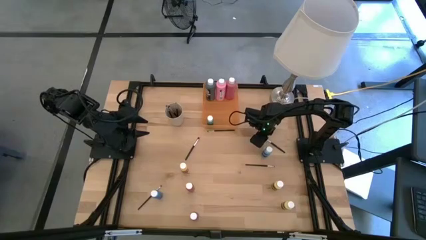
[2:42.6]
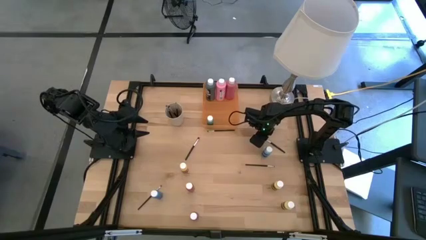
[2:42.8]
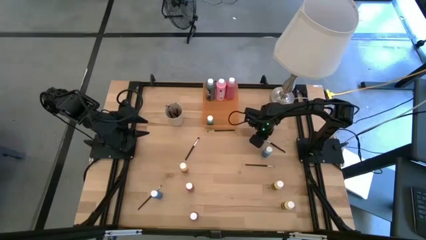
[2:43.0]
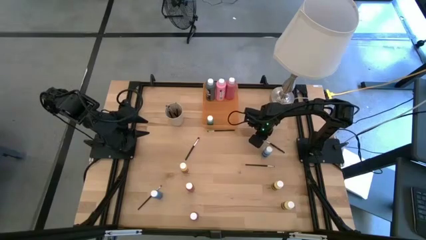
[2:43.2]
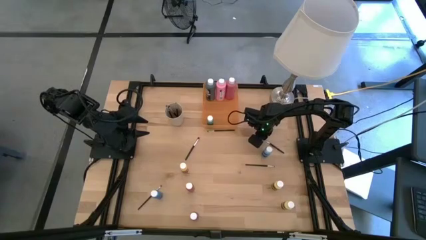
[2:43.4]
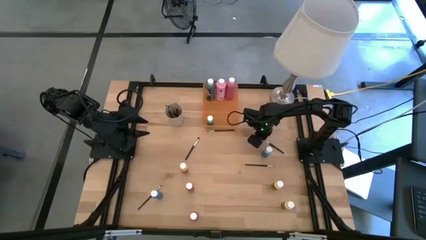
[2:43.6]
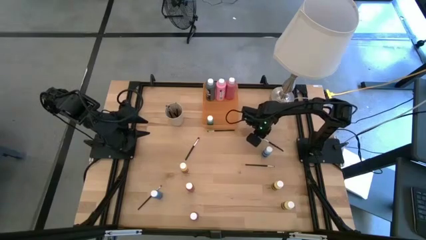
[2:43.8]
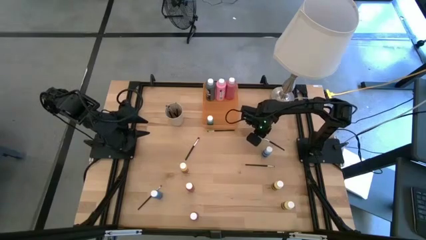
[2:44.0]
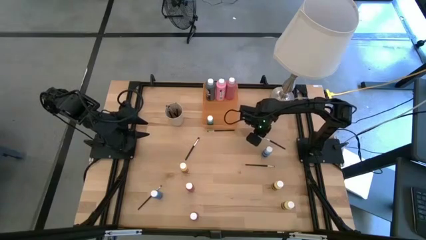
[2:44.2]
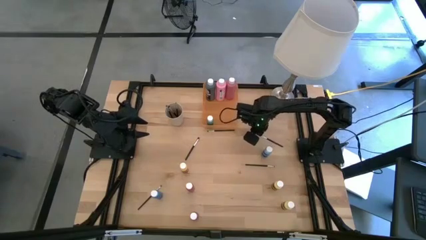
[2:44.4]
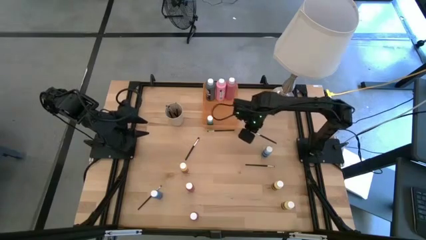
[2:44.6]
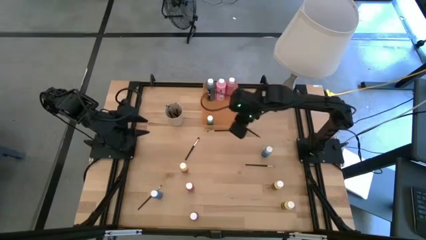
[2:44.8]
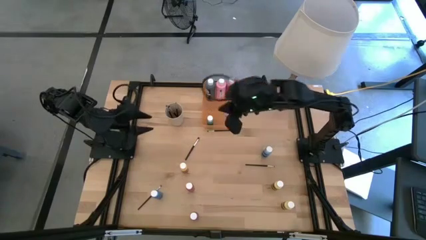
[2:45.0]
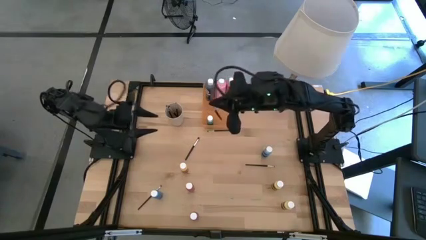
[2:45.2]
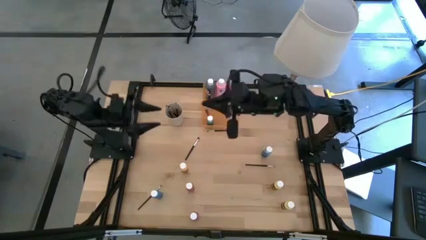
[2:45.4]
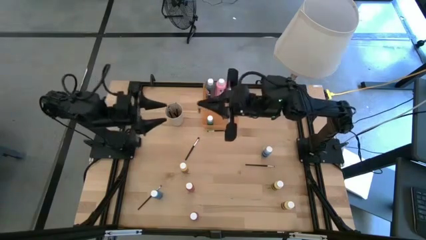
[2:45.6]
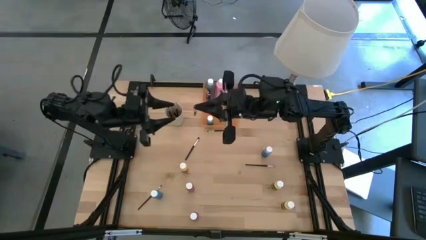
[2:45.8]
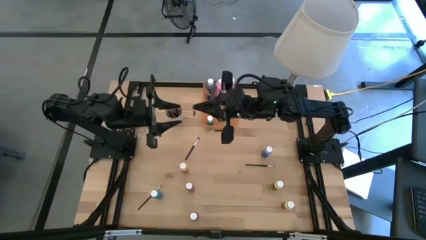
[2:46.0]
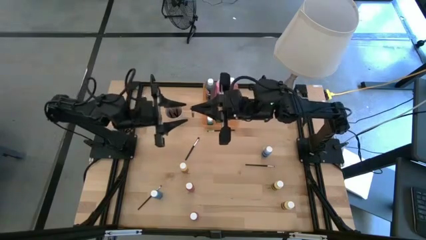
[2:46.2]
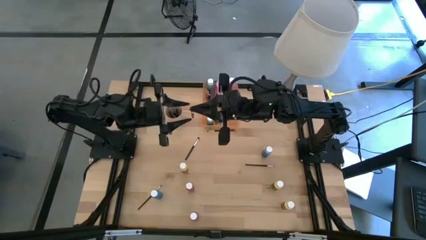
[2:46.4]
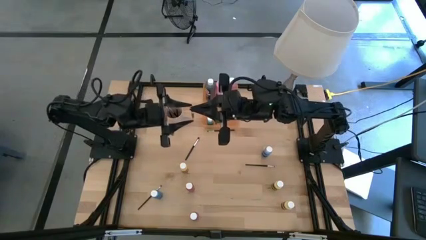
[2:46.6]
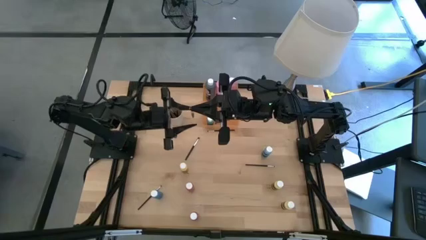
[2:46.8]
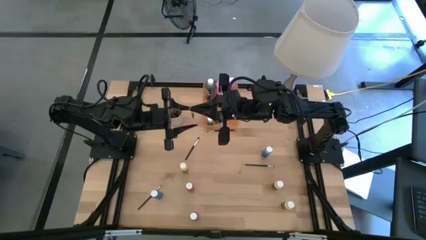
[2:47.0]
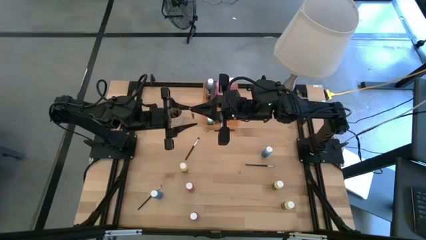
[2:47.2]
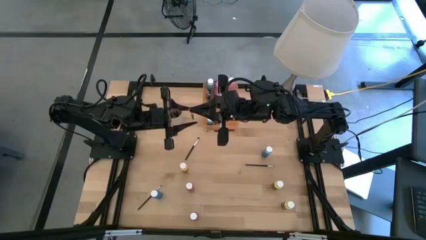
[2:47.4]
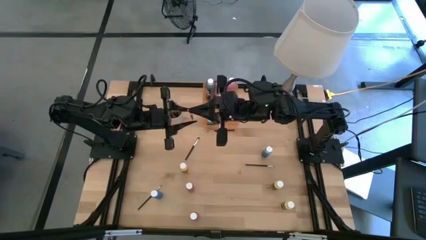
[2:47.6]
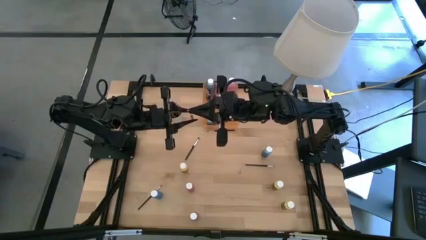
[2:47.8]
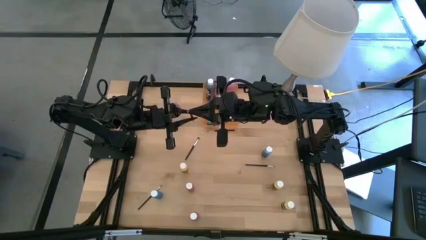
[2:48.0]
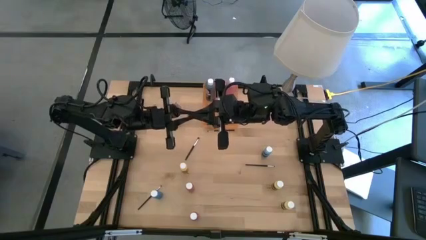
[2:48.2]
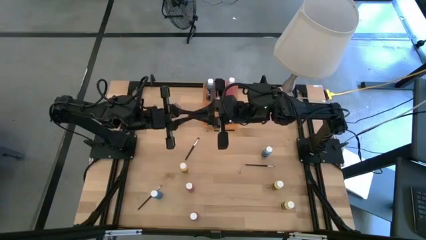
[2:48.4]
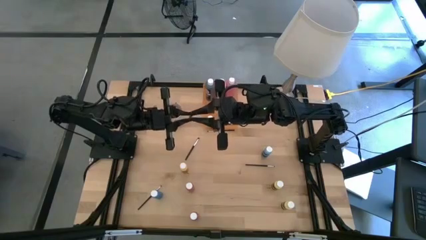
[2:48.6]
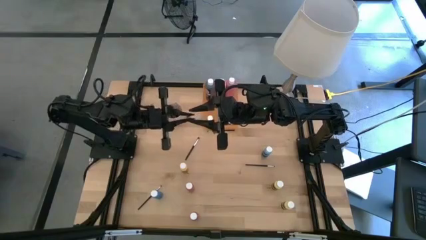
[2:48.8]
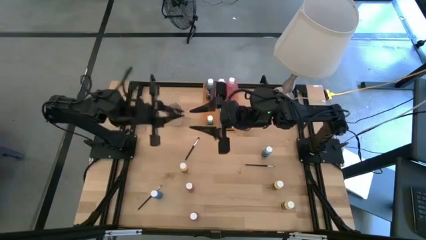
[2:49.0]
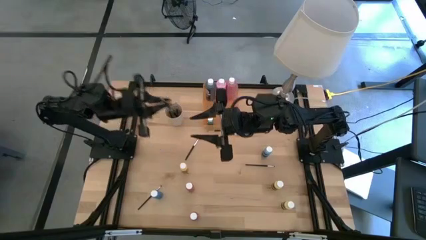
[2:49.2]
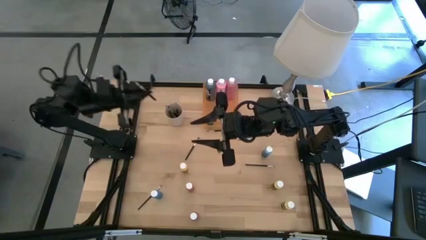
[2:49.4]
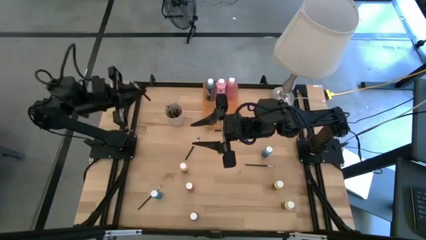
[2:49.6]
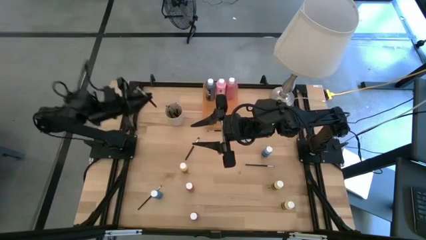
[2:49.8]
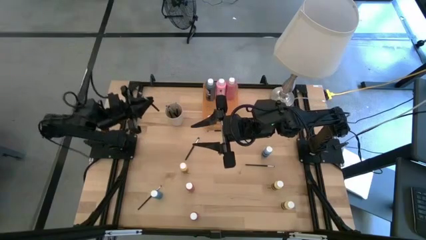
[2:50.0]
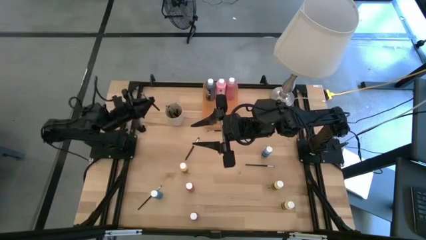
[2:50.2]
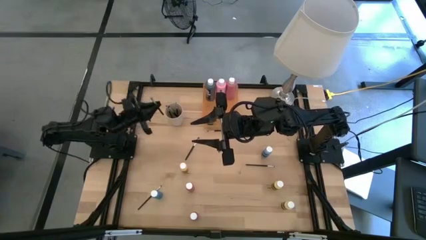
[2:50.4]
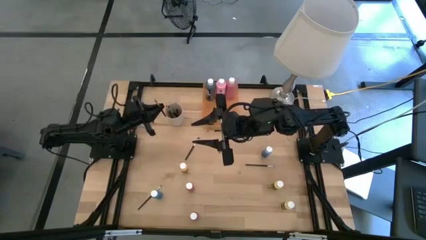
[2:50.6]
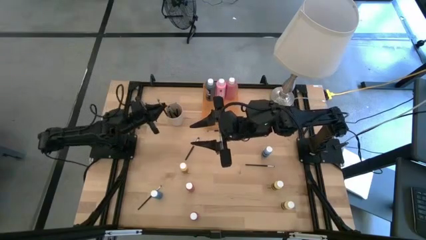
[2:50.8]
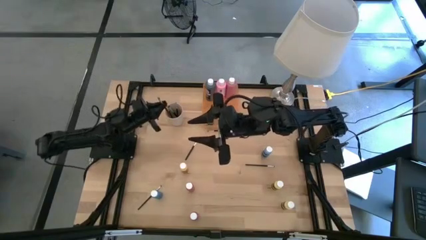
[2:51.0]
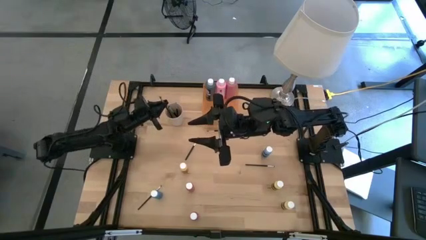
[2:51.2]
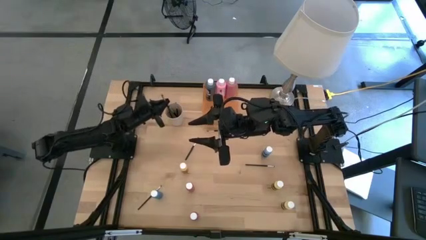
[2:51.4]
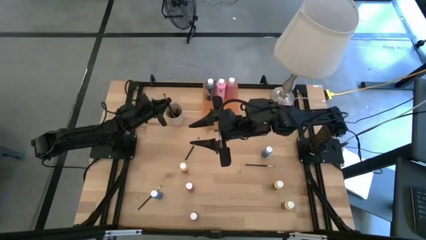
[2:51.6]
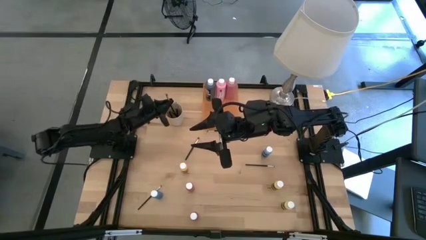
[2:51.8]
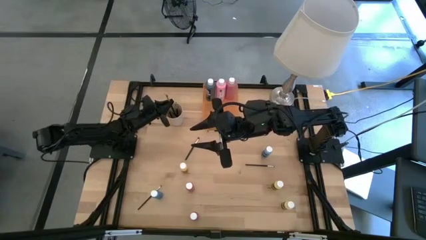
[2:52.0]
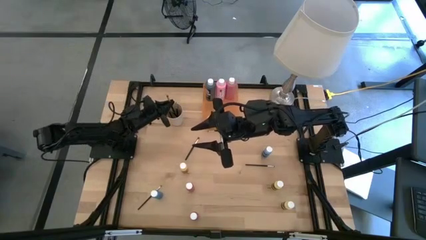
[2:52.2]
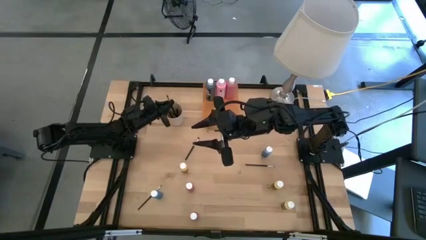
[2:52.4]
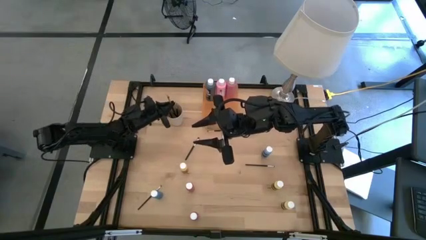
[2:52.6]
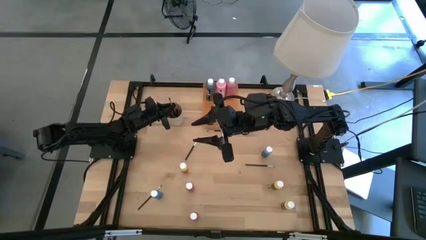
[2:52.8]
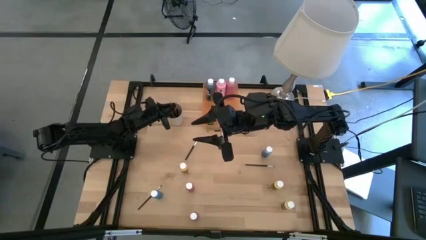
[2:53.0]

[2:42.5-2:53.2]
Task: Pick & Place Paint Supplies
Put the black paint brush into the white cup

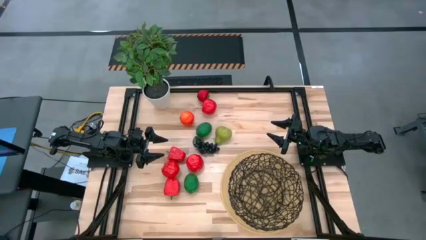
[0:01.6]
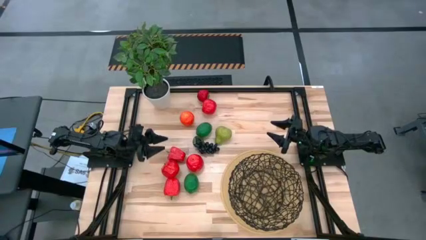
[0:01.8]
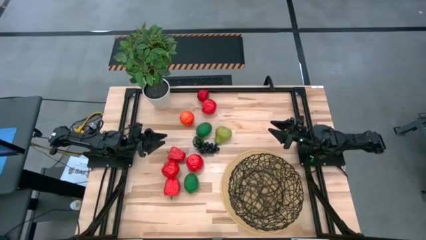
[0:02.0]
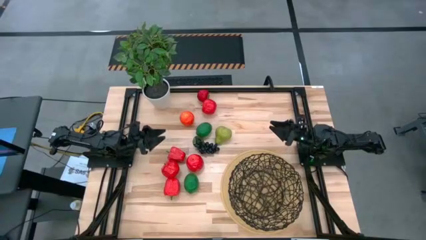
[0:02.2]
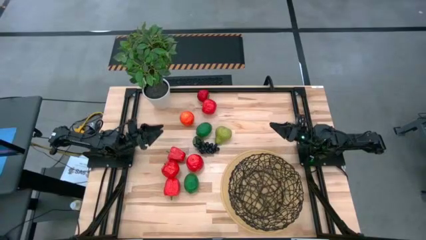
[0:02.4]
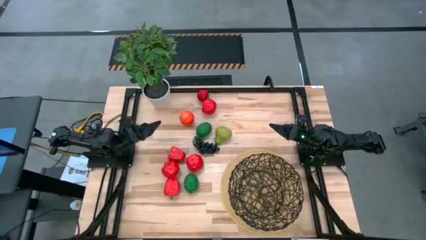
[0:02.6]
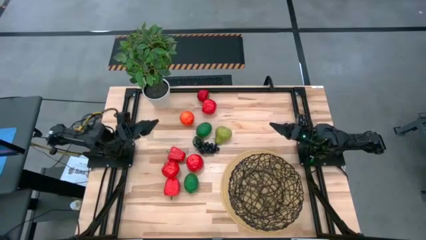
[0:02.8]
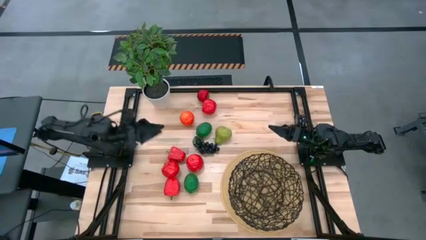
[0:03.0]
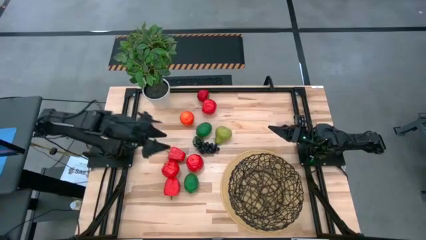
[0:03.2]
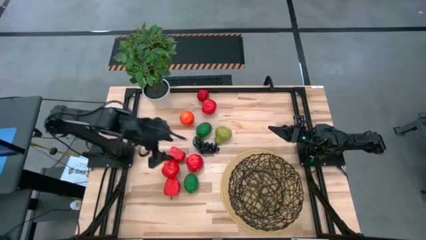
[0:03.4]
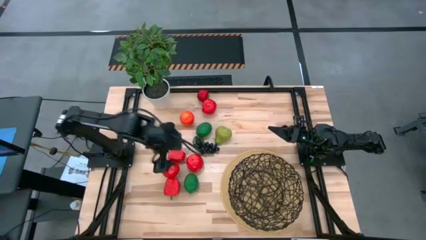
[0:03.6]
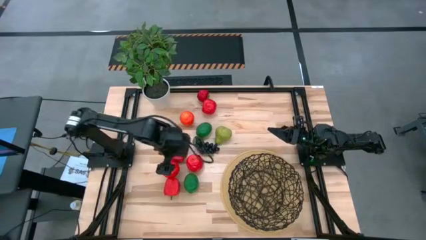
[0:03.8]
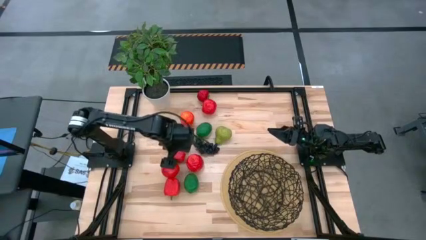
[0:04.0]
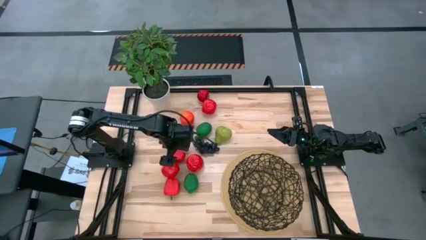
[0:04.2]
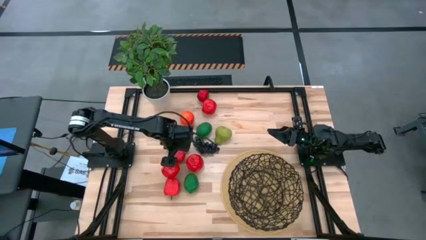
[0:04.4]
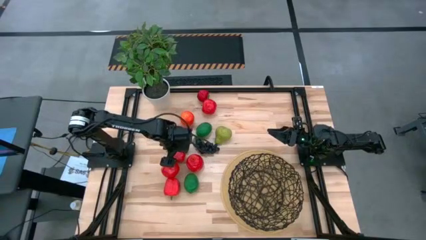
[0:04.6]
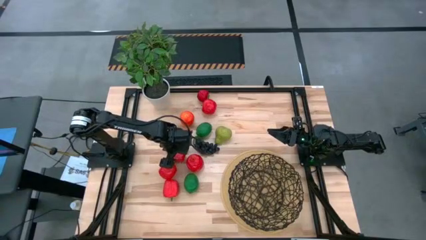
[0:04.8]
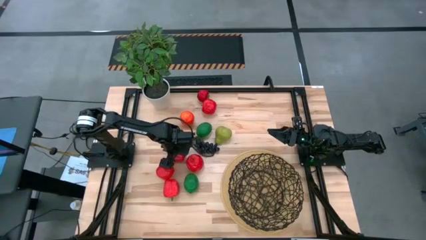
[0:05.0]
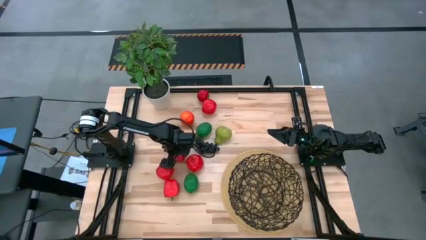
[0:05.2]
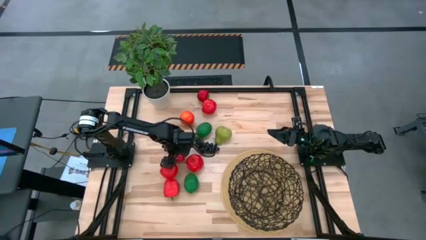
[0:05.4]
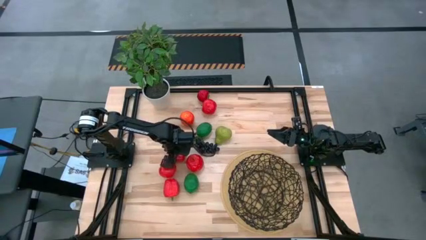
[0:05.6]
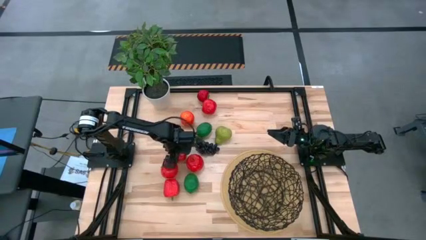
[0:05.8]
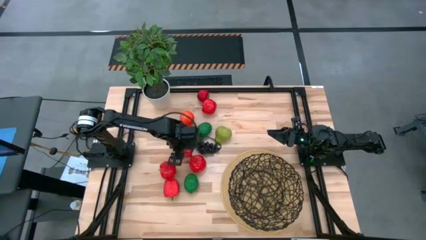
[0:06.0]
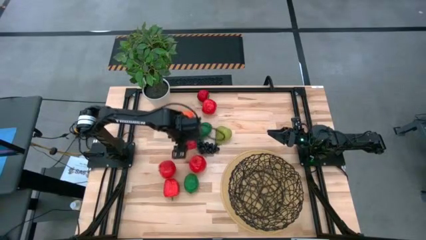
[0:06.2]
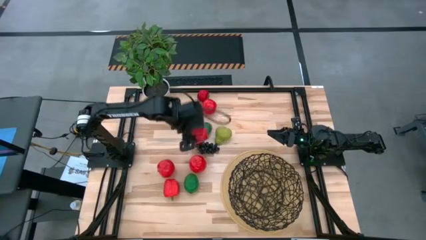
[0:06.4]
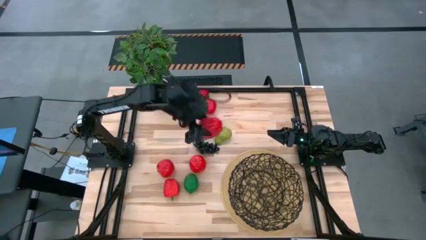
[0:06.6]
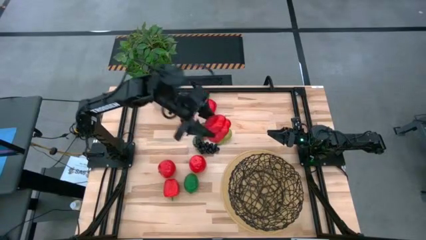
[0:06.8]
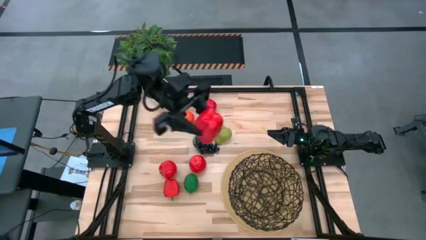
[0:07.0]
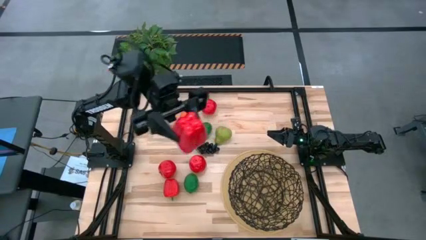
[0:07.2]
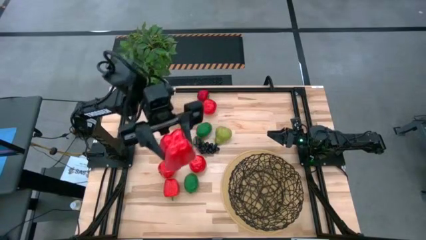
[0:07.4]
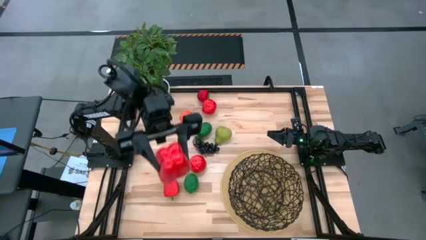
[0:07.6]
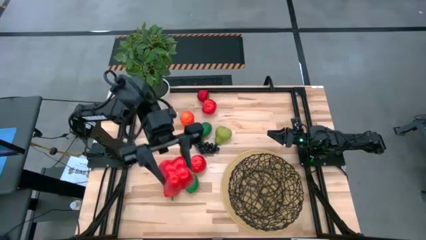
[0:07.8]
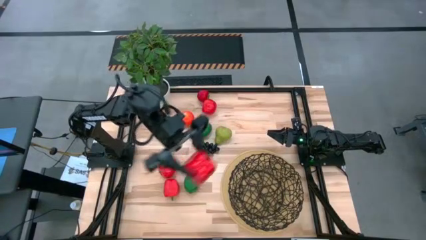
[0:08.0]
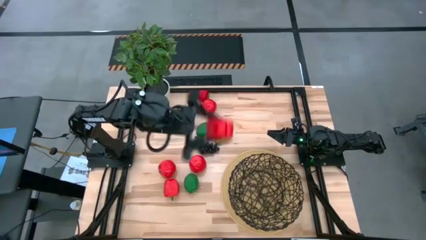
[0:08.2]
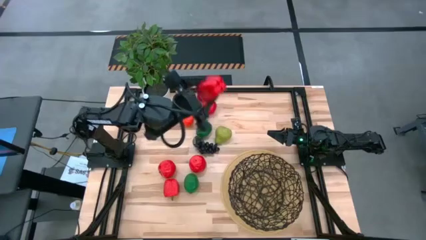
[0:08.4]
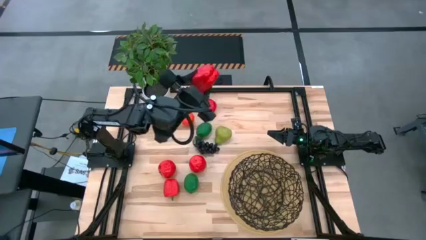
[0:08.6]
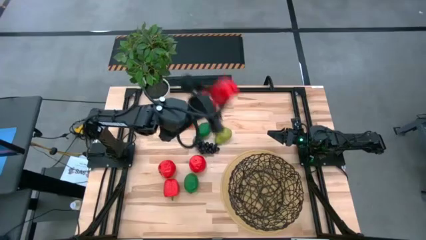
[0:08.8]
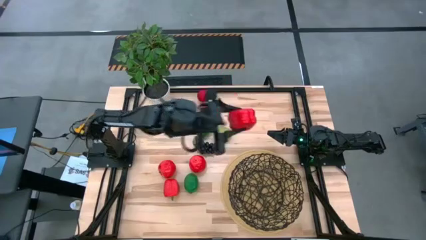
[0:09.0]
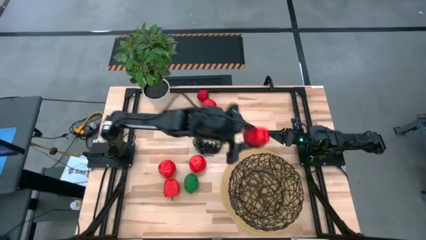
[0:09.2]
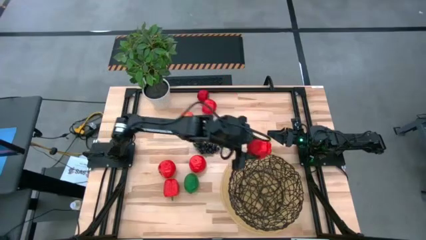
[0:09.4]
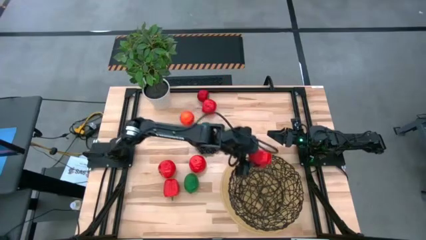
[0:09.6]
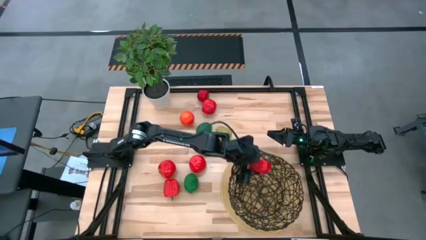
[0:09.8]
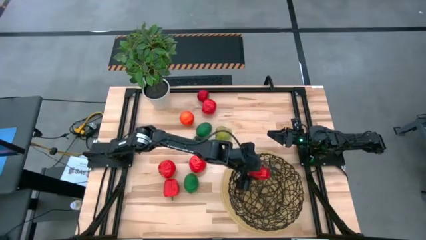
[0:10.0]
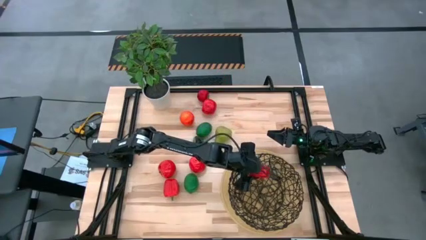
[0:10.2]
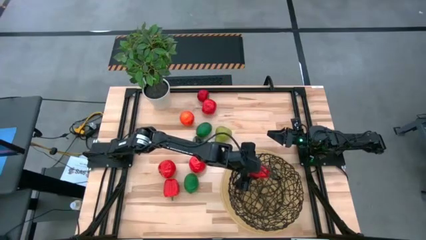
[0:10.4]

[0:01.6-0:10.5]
Task: Build produce basket
Put the top red bell pepper into the black wire basket
